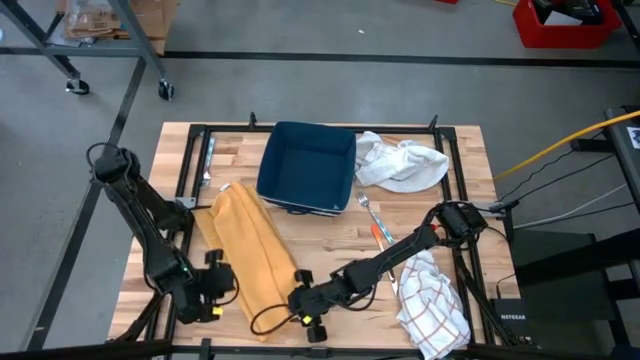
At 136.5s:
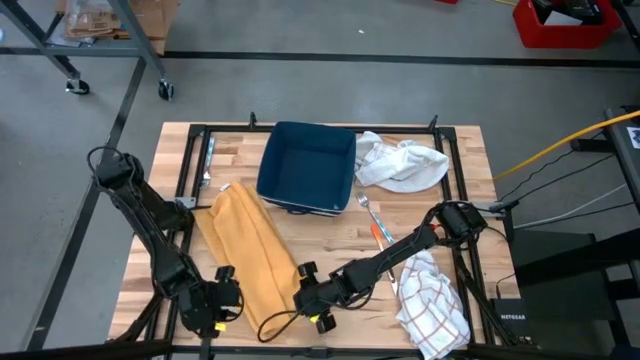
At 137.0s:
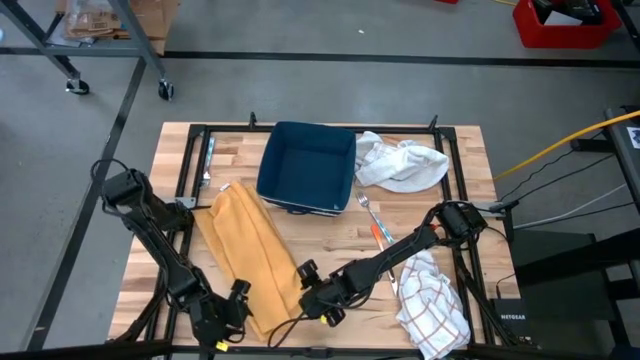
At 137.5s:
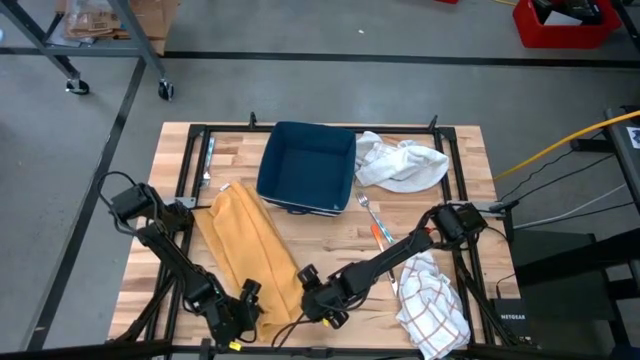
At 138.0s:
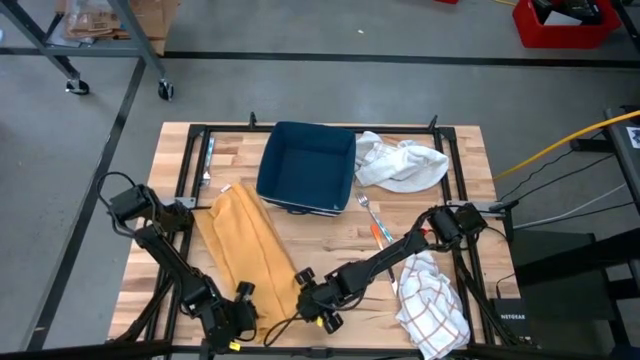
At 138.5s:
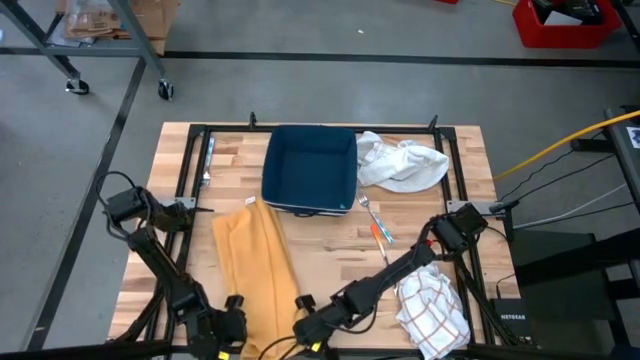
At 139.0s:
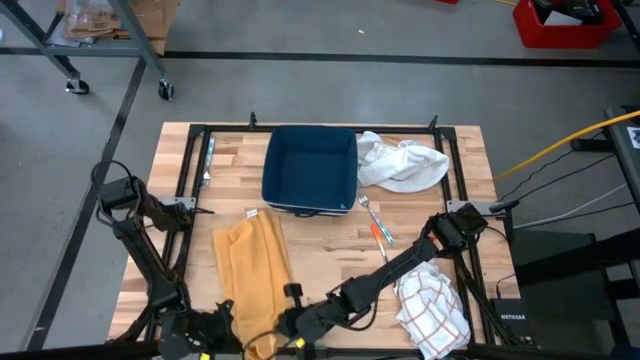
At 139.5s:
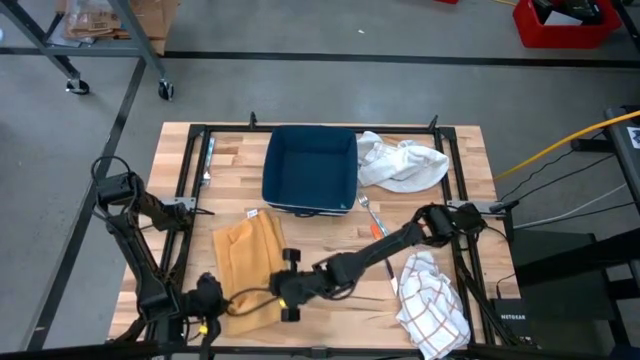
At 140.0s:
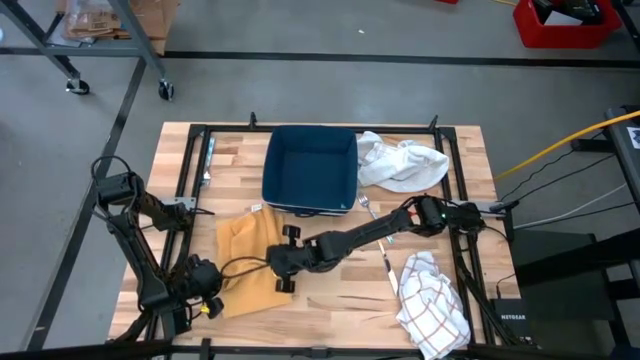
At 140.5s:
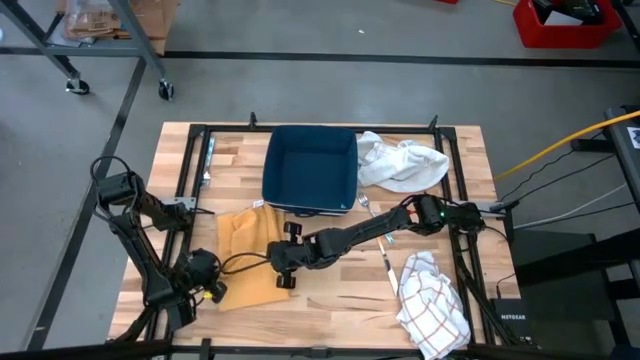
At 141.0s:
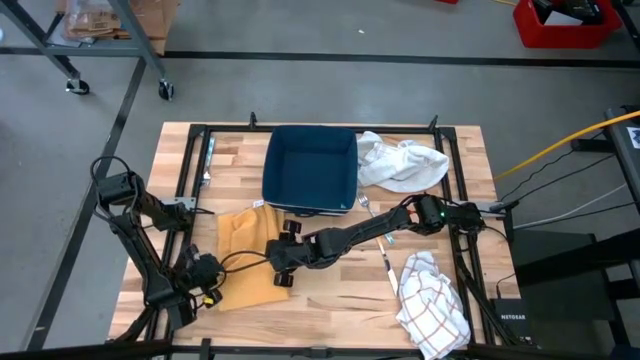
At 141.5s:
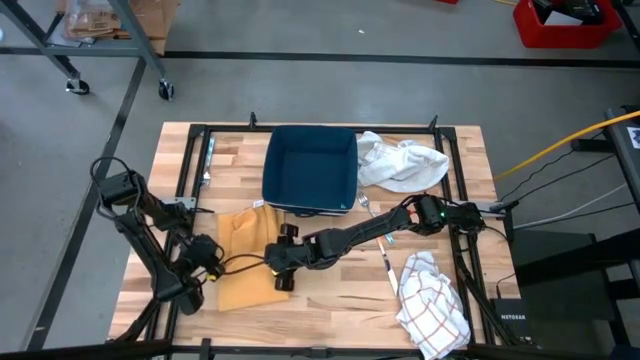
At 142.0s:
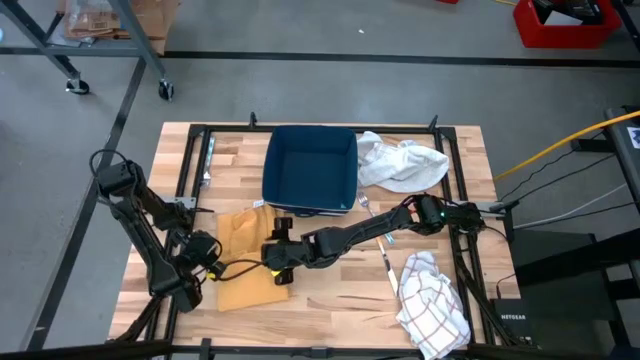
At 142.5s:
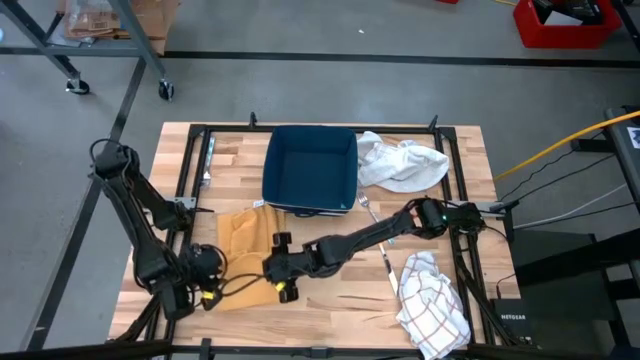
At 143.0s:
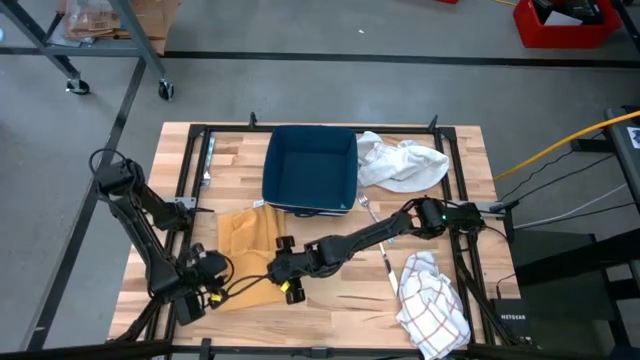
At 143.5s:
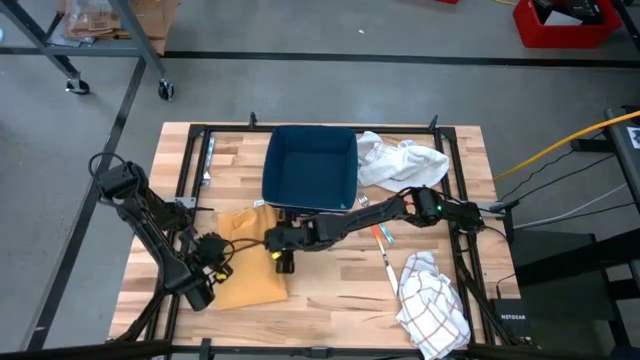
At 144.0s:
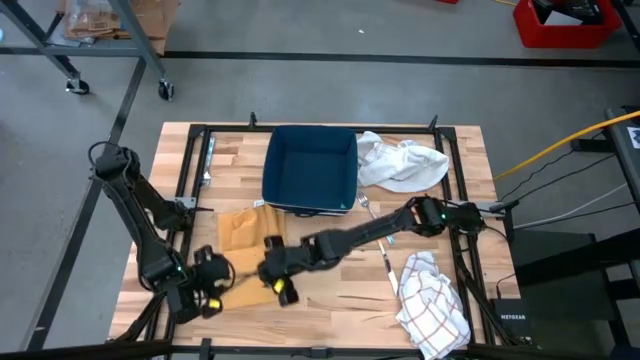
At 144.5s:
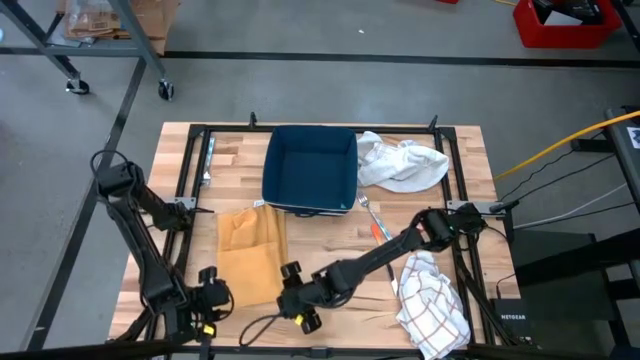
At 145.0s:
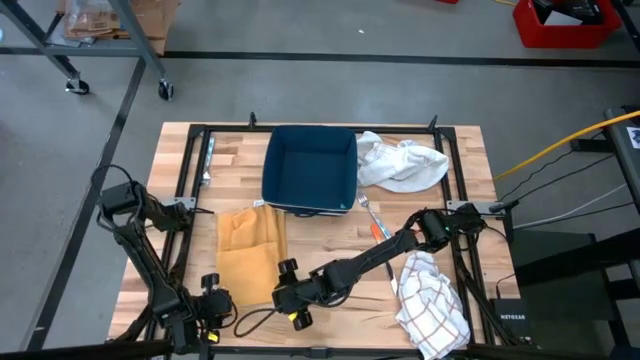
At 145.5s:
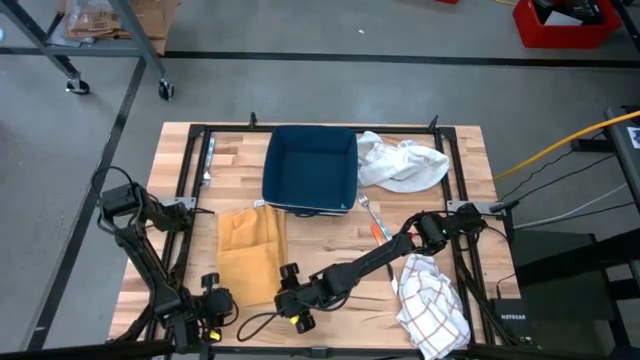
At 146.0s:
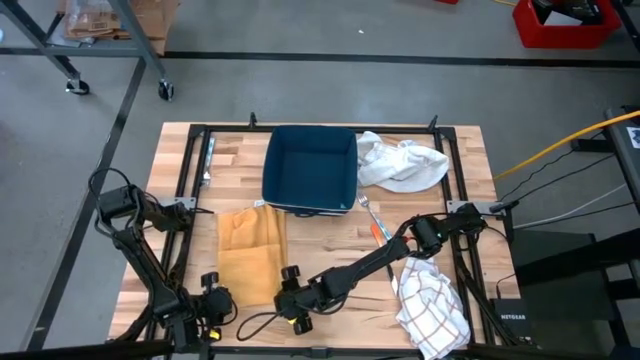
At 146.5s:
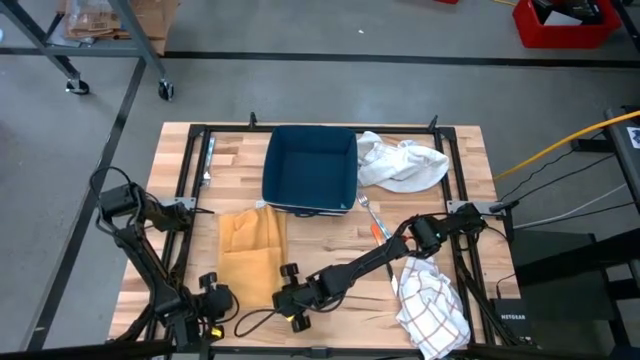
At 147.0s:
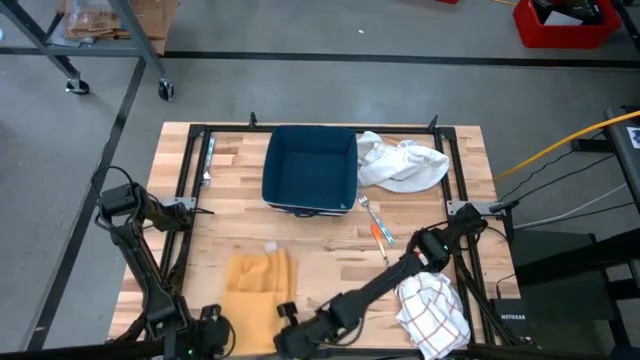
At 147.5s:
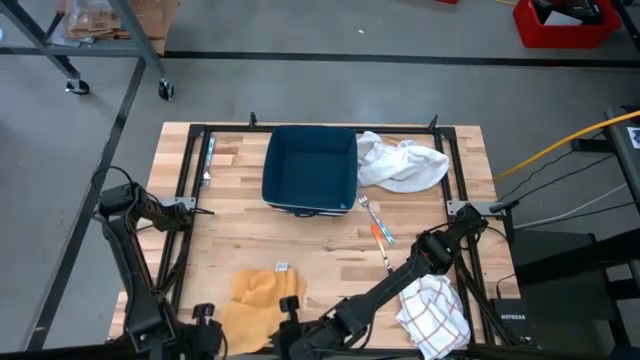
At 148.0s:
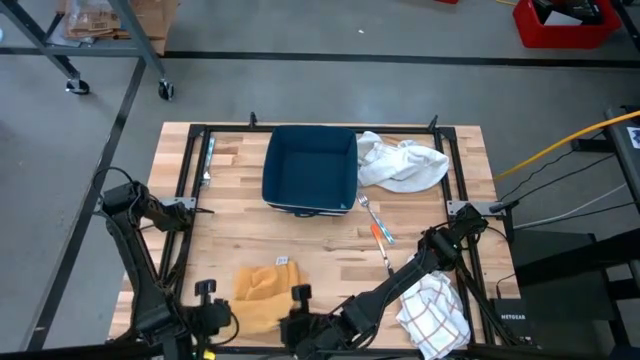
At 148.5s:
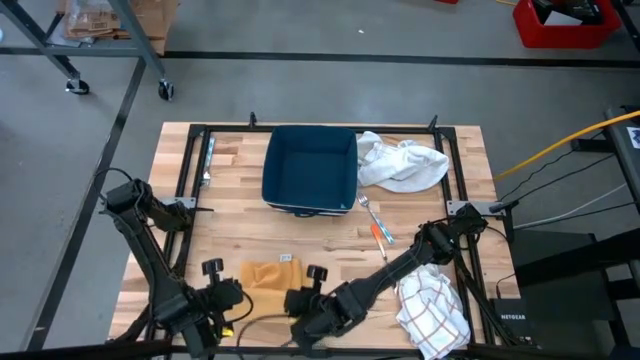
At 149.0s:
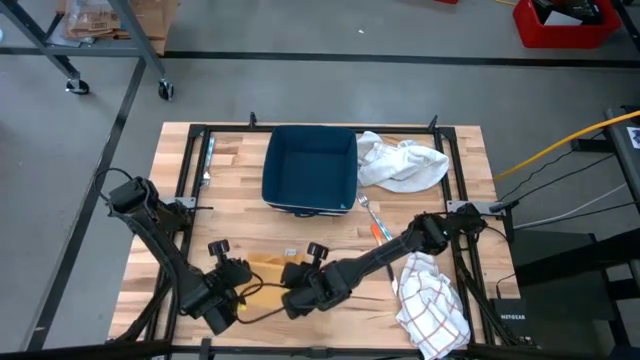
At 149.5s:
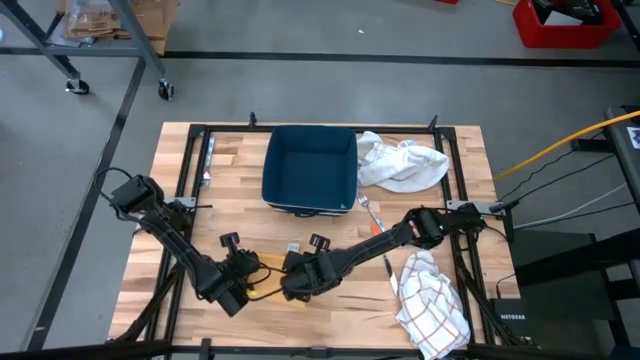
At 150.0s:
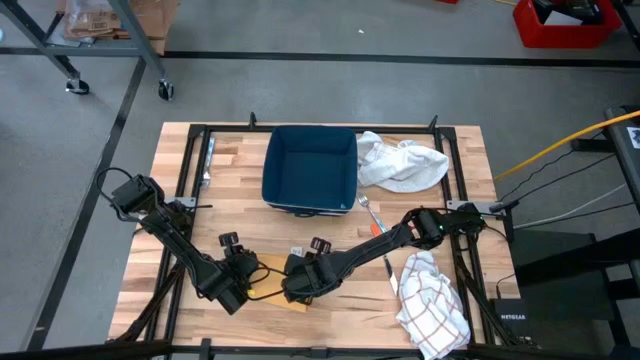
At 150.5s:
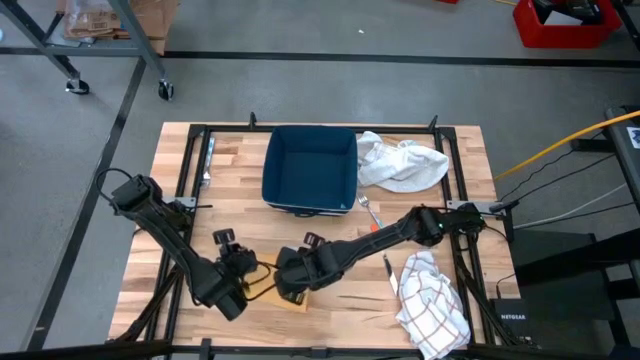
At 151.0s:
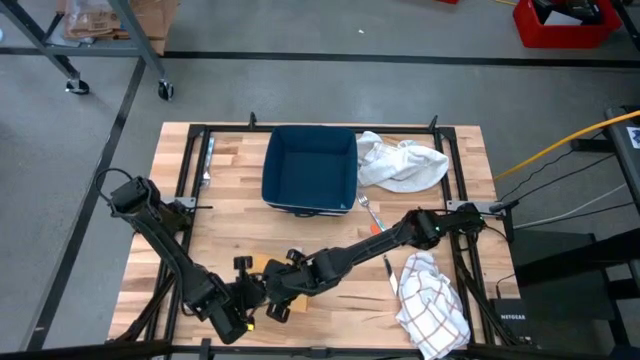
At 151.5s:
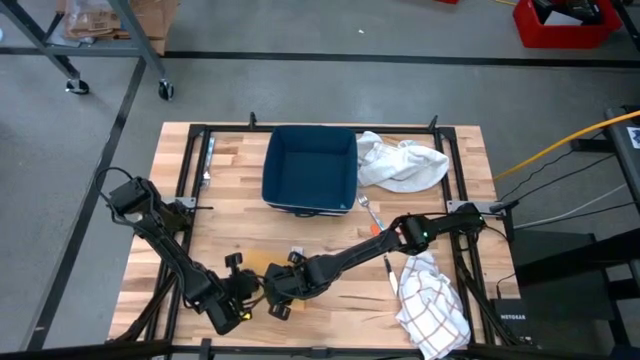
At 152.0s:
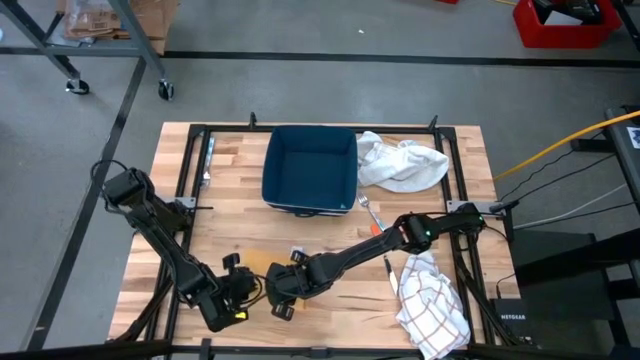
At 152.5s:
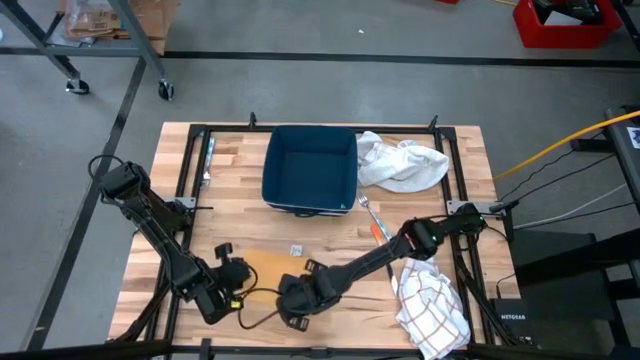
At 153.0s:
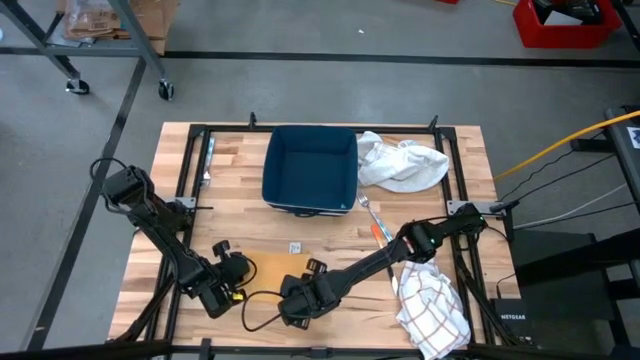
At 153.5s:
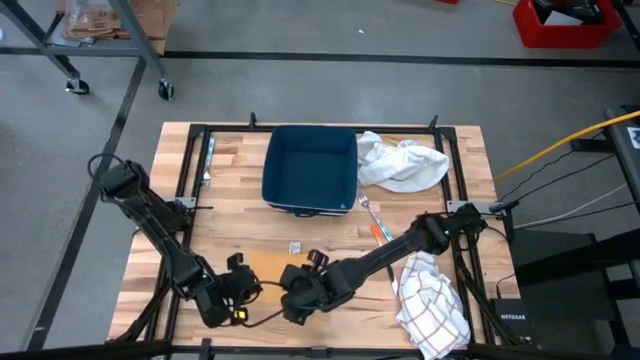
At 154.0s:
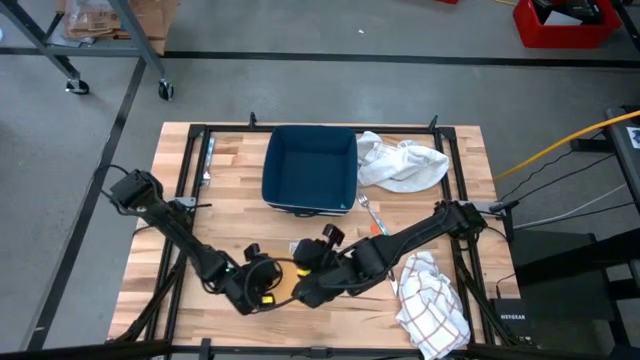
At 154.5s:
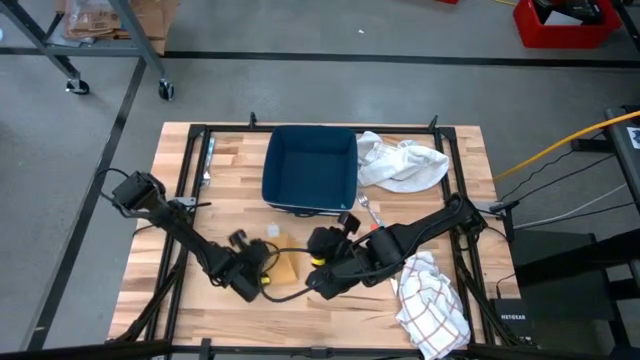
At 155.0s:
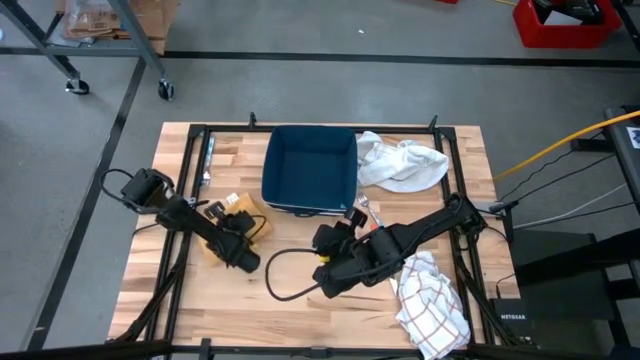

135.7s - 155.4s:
Task: Fold towel
Fold the yellow towel

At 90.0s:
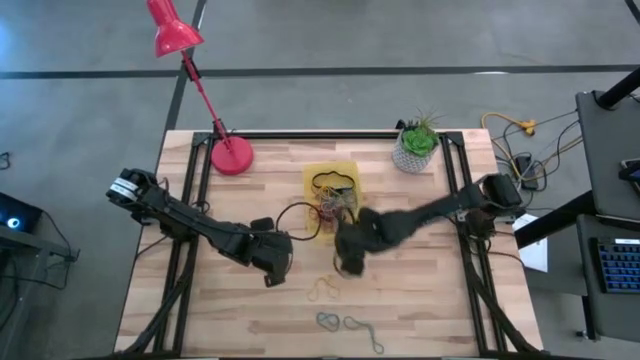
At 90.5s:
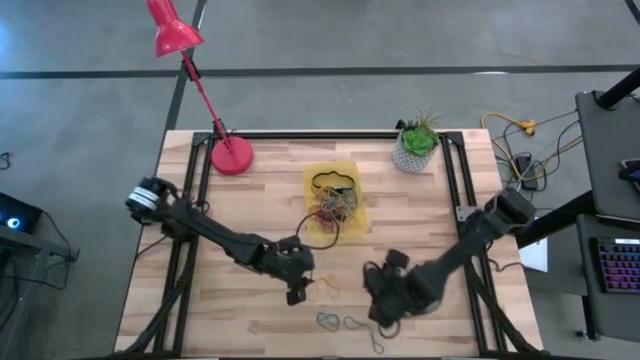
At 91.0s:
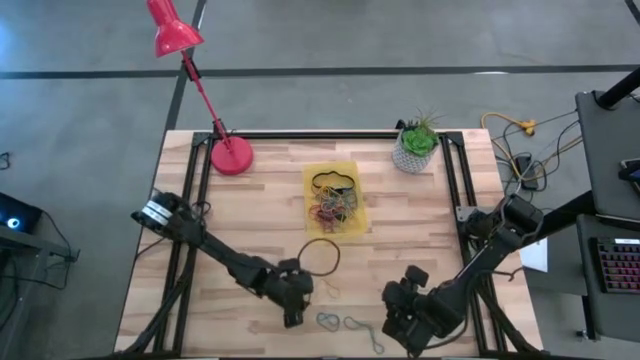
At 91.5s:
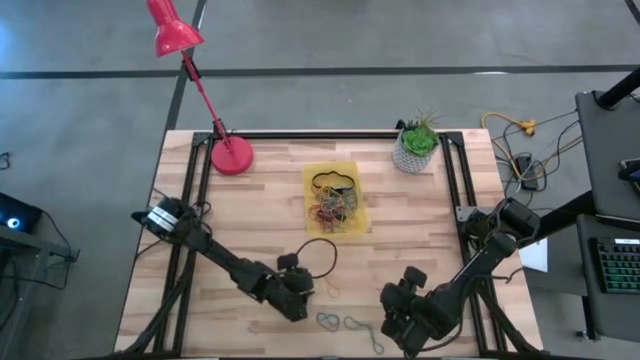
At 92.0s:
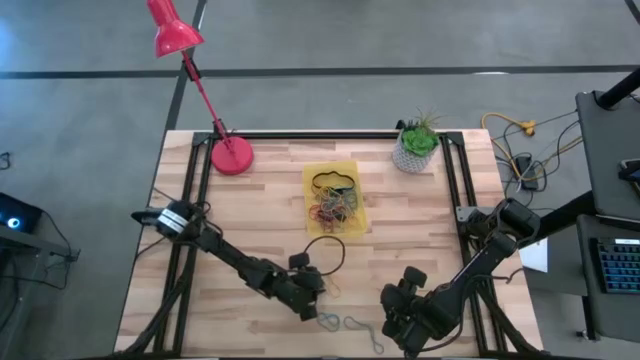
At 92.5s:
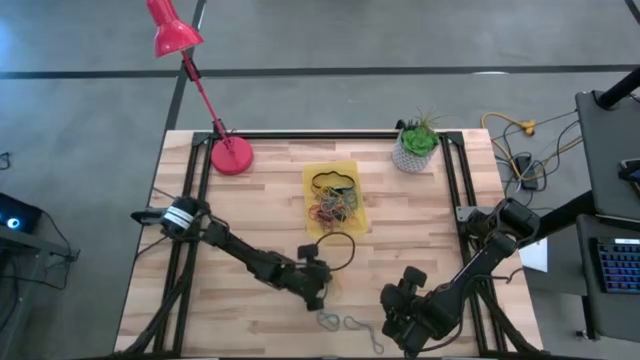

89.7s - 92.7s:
Task: Pick and place rubber bands into bin
Put the yellow rubber band into the yellow bin
